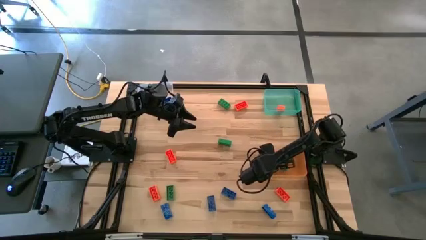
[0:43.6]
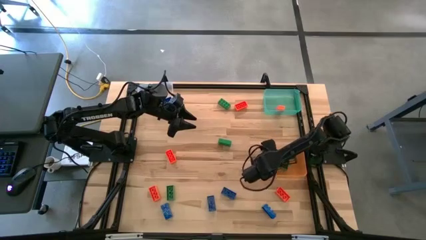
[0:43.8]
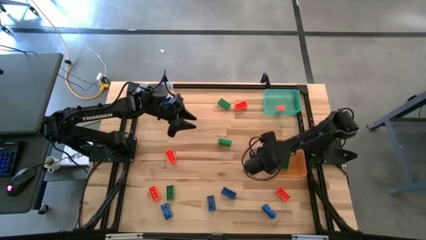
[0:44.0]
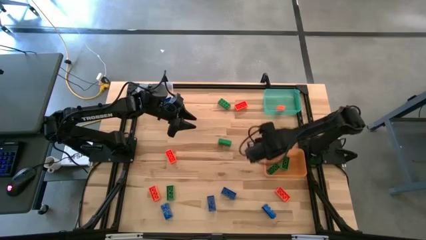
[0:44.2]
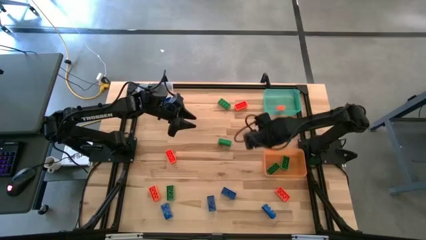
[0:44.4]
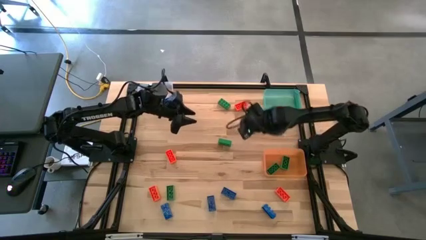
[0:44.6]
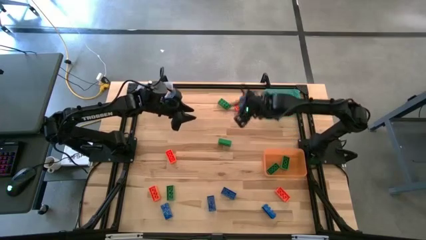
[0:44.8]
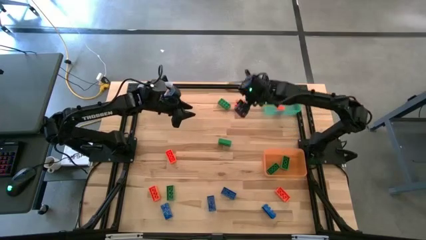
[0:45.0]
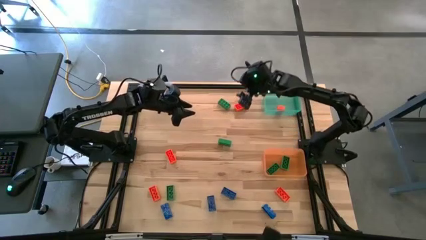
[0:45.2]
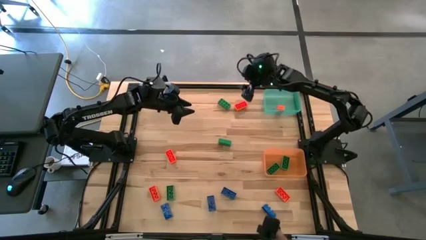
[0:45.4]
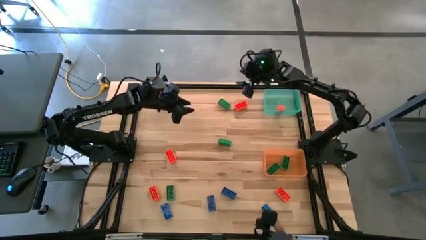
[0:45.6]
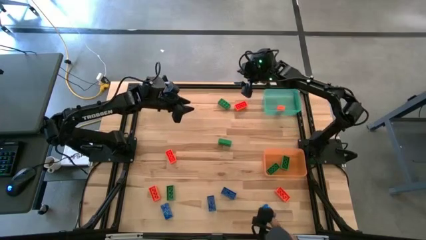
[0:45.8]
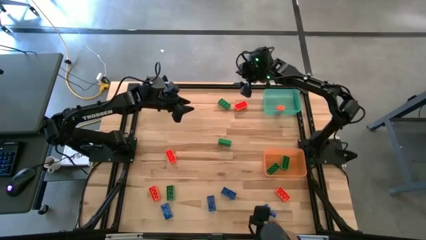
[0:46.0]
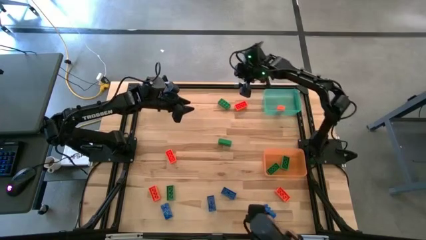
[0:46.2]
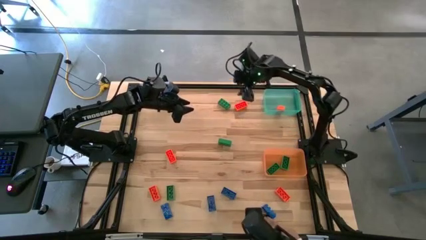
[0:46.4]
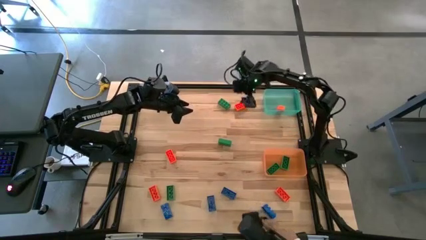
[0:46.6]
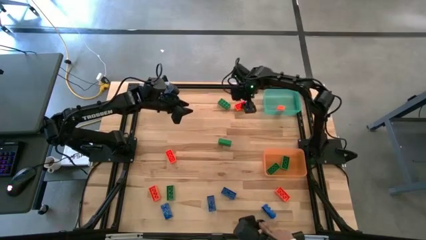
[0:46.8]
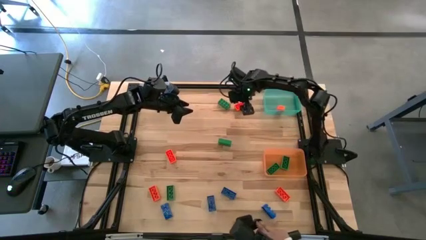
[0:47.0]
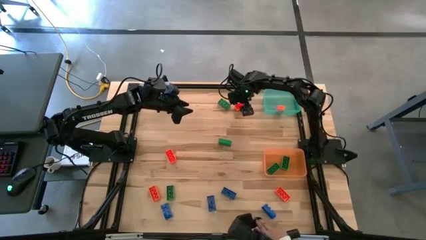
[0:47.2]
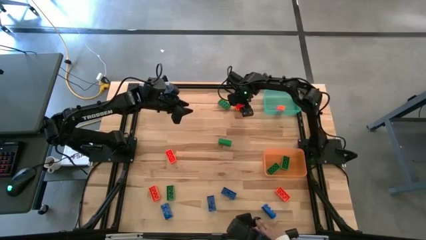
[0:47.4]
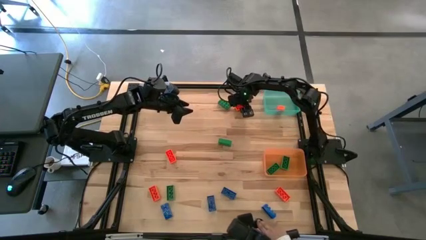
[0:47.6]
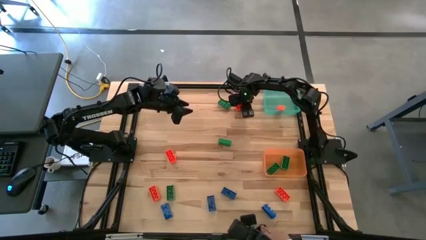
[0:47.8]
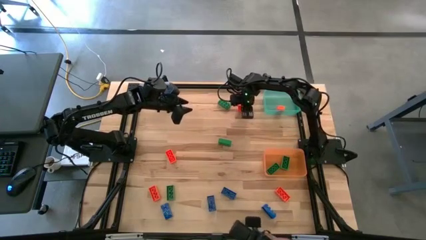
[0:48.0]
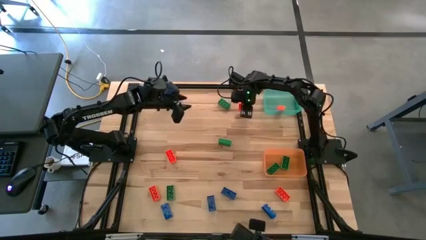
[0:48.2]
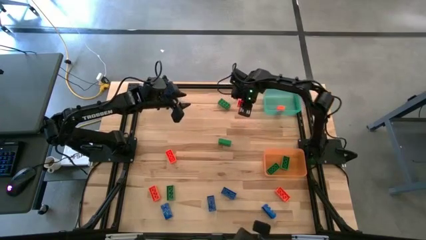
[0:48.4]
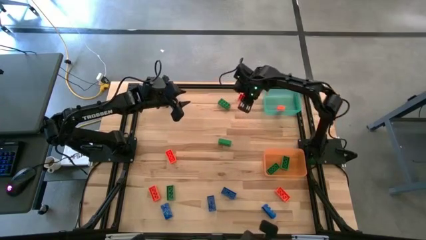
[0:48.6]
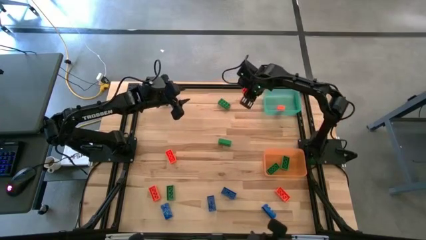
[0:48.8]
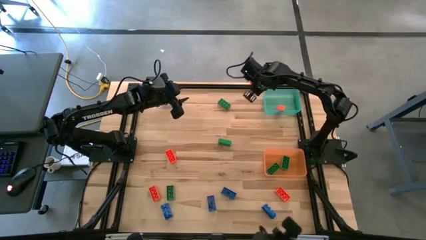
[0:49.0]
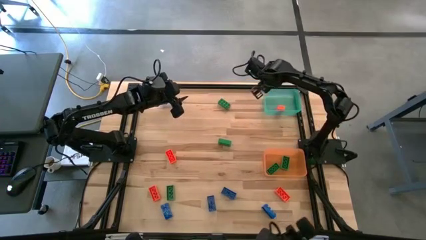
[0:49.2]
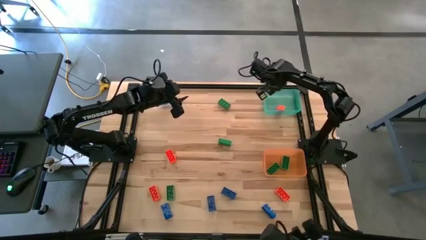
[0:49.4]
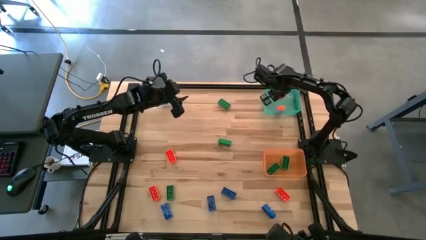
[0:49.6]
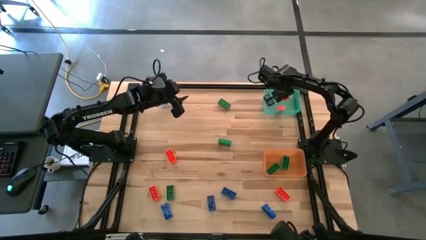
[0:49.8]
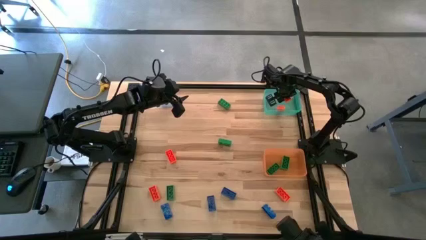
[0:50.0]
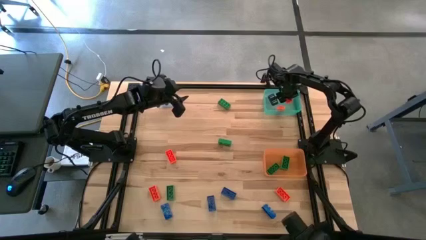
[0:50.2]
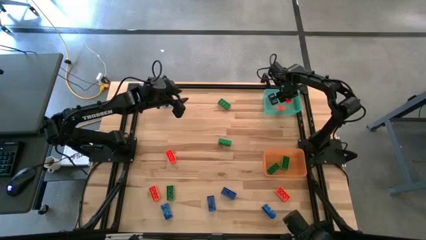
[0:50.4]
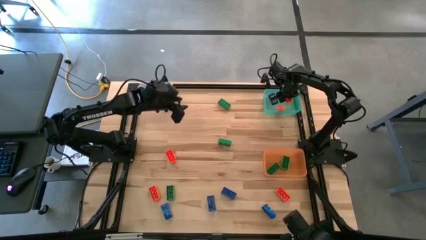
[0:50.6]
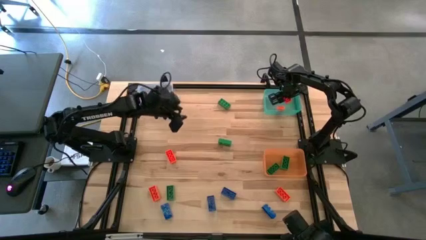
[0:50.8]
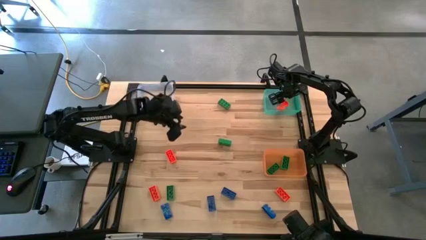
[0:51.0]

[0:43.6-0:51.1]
Task: Sort & place blocks by color
Put the orange game piece into the green bin

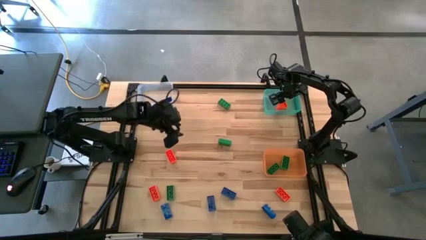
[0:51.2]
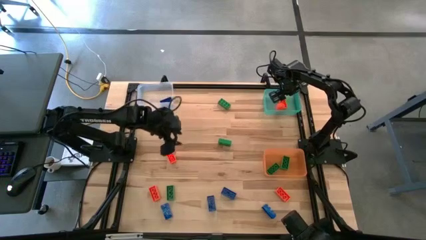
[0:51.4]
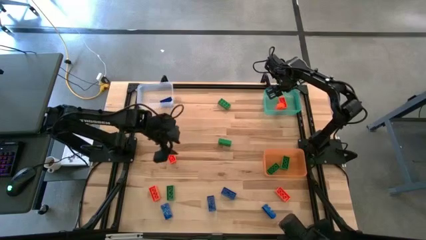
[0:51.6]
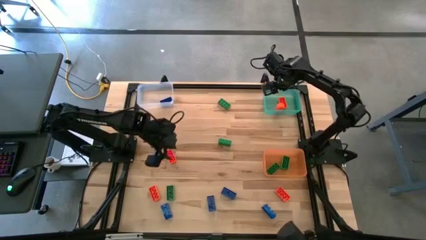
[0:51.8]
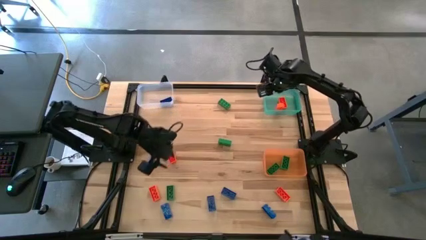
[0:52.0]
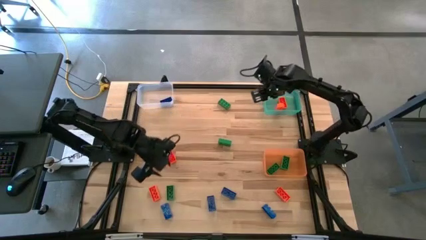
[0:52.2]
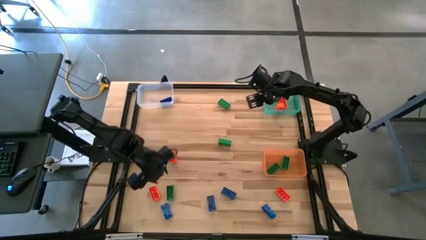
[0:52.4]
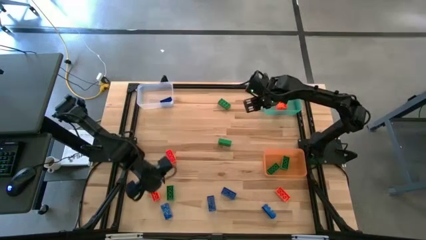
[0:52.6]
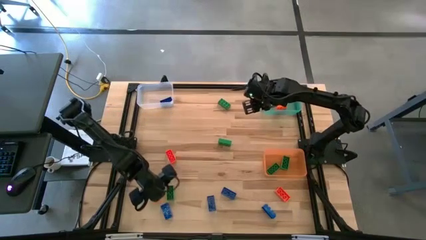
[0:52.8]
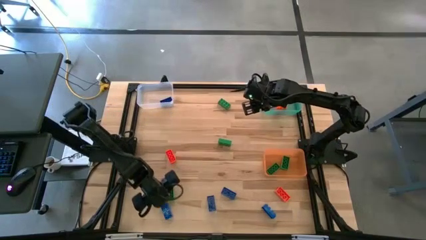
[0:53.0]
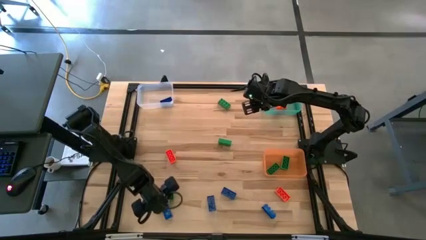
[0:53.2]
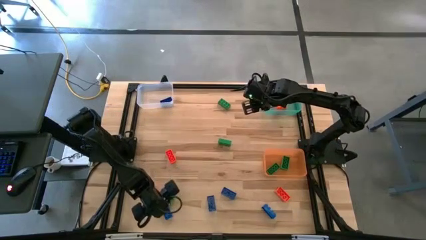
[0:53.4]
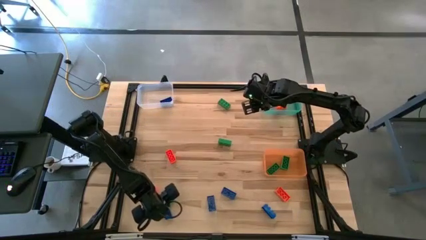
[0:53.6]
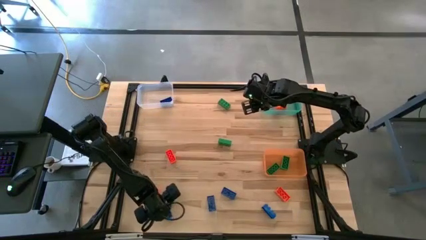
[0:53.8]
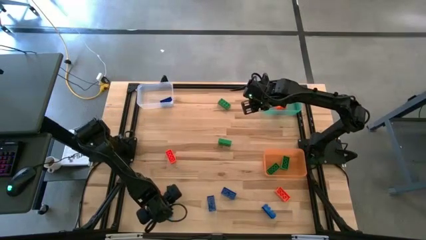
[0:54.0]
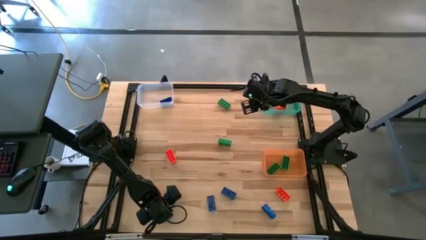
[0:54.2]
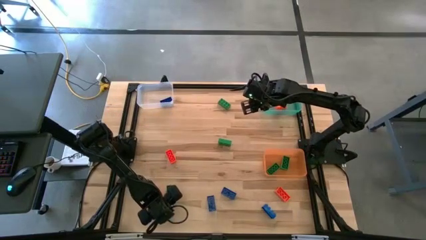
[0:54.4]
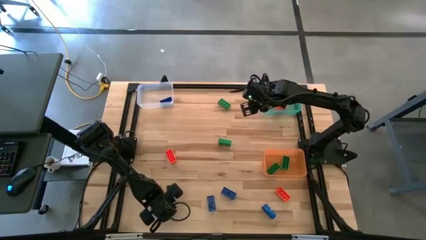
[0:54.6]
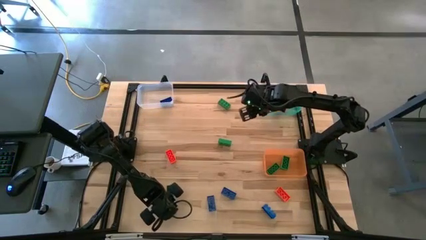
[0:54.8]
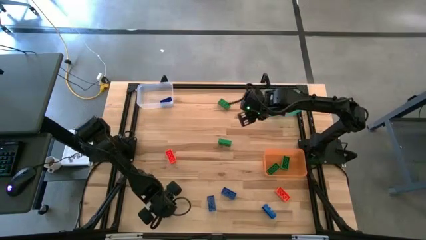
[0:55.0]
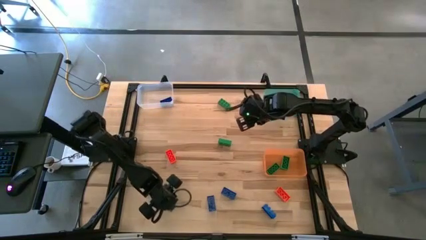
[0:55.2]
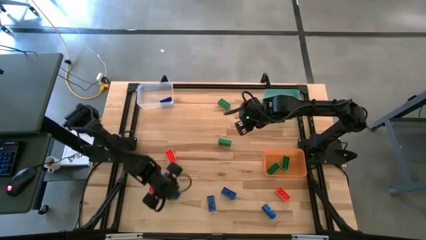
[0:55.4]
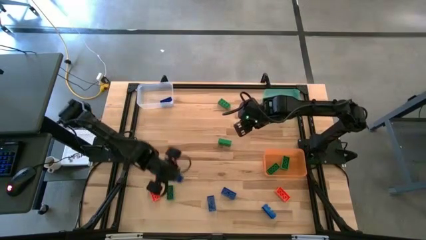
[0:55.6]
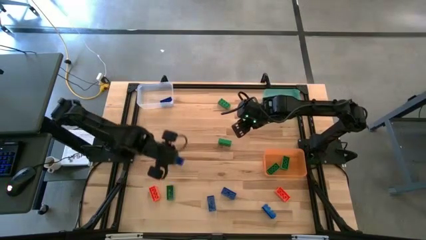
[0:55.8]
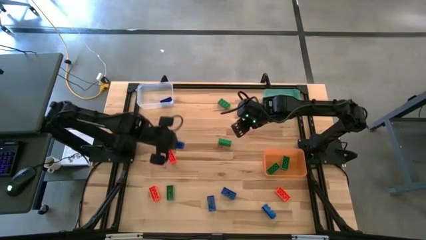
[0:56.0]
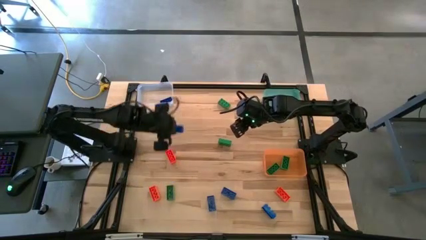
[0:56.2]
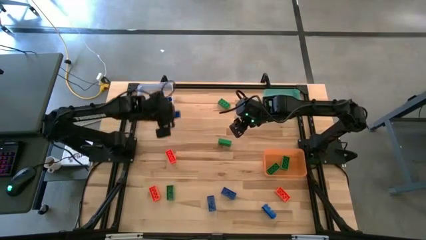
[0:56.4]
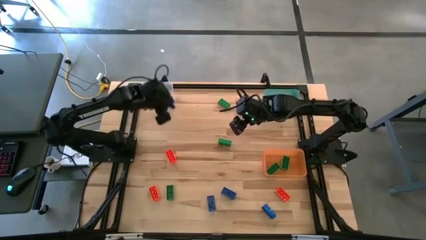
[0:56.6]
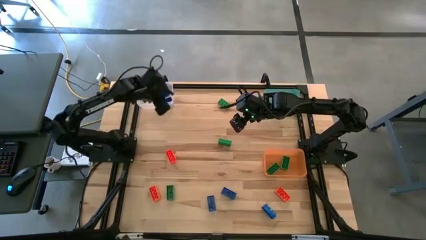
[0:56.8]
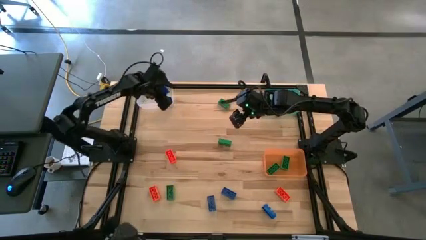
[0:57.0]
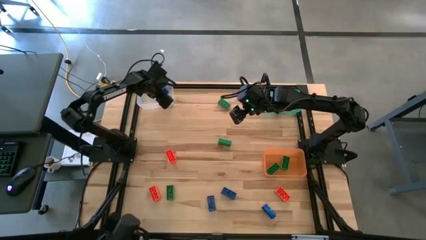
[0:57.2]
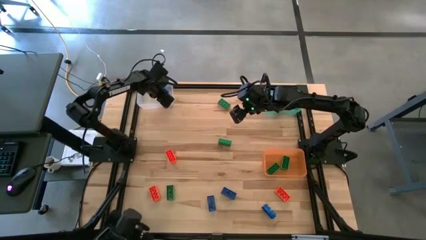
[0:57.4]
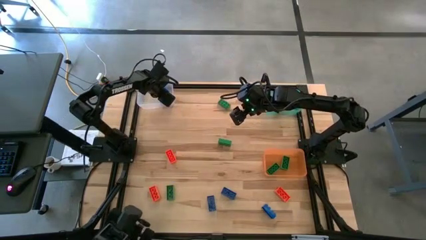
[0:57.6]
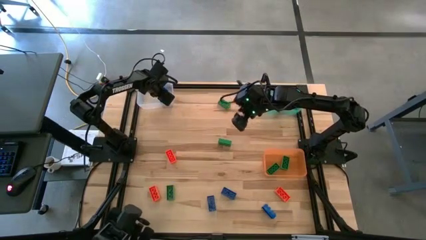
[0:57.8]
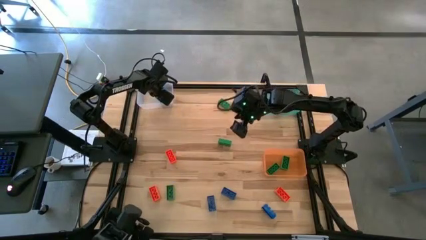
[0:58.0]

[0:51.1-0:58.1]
Put the blue game piece into the transparent bin

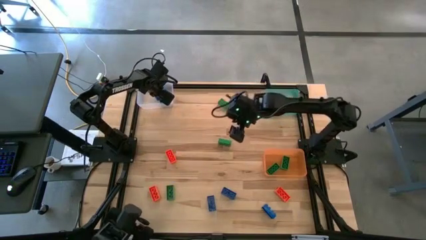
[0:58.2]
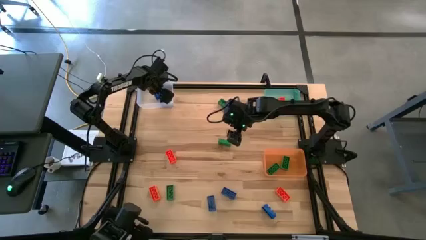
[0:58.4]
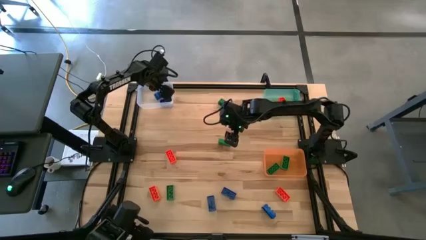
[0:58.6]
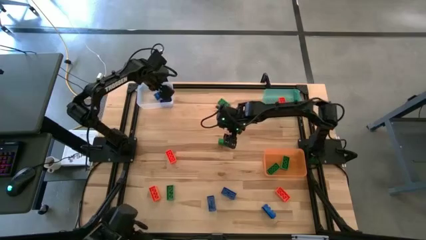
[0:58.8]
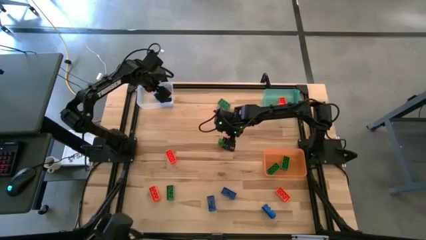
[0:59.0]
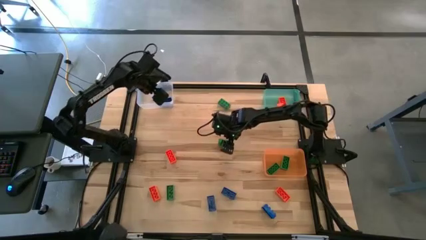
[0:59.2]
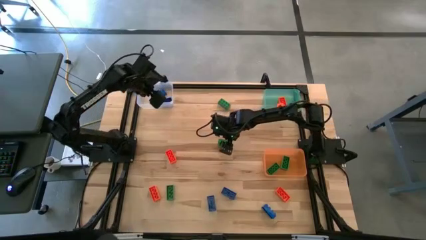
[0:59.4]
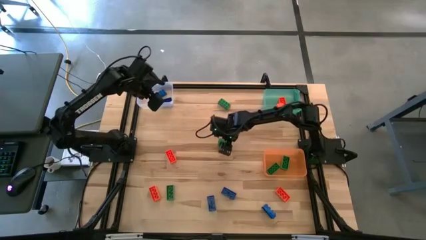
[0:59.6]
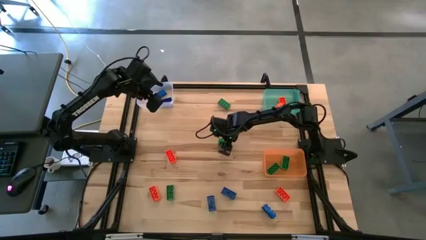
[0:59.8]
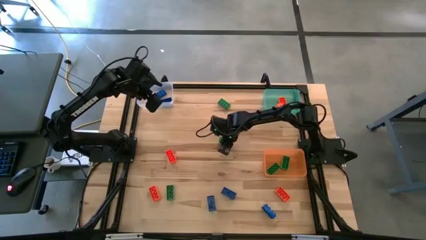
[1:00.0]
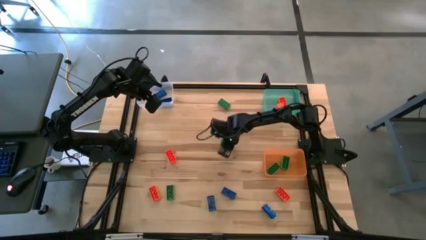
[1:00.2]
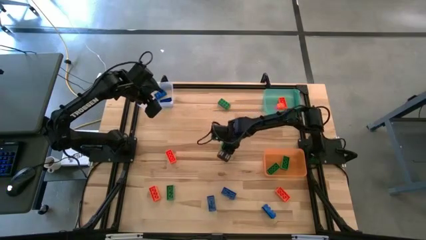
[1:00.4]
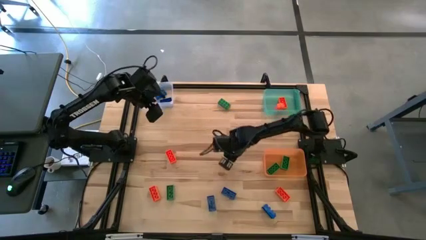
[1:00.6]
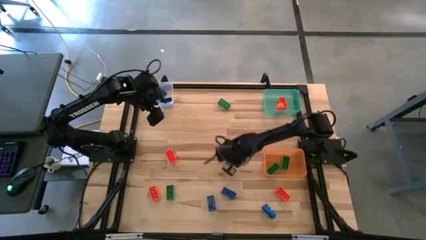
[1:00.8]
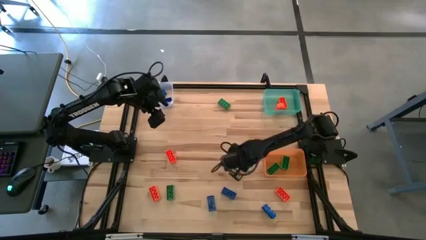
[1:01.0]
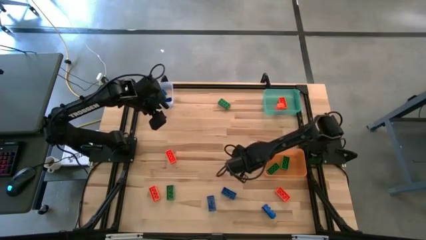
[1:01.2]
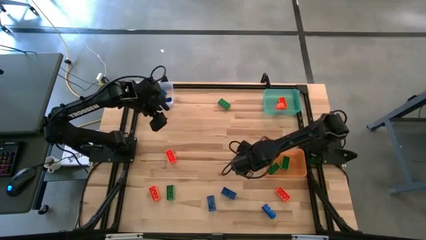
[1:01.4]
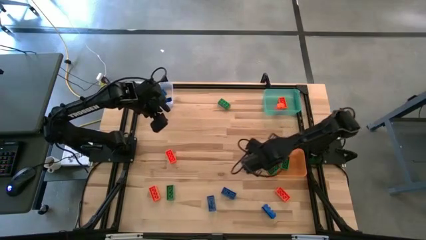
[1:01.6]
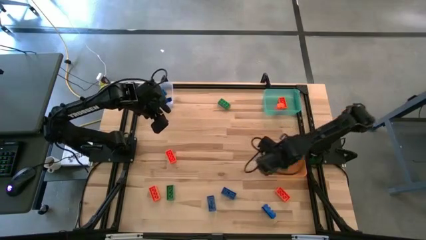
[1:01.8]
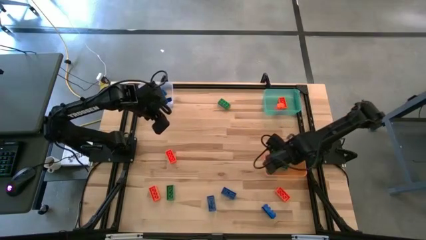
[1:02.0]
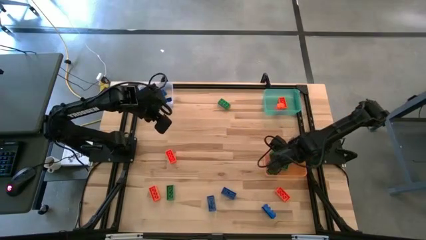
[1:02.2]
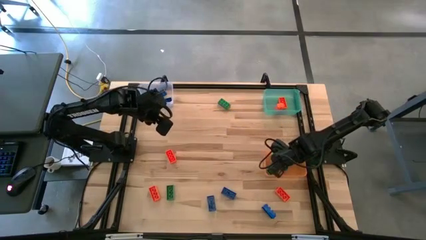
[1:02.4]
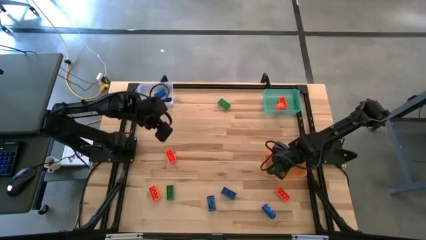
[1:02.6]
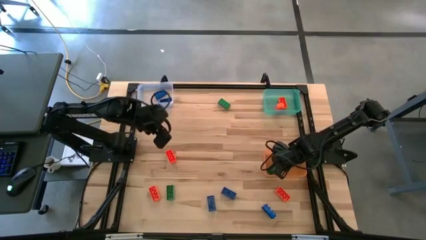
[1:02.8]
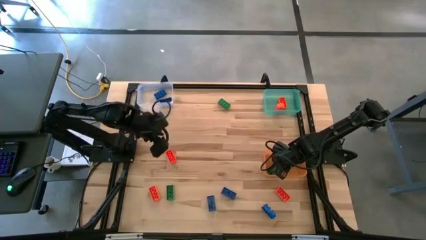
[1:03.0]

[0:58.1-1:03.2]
Put the green game piece into the orange bin
